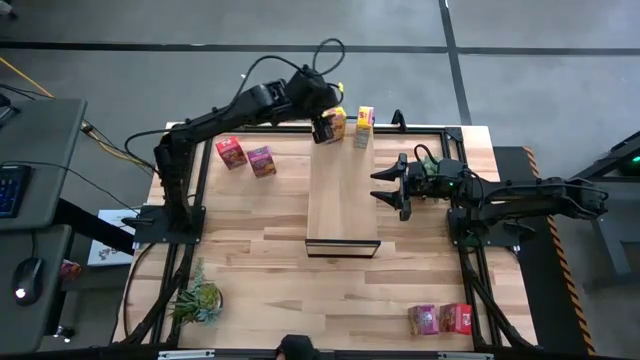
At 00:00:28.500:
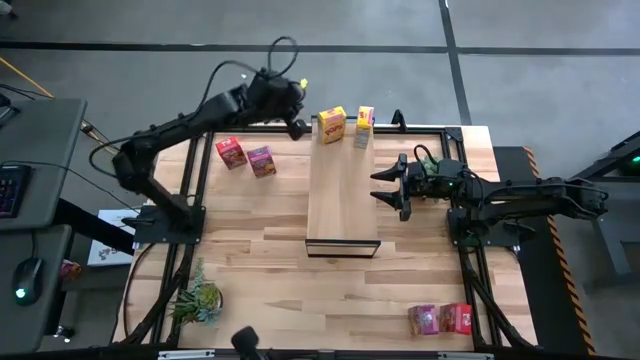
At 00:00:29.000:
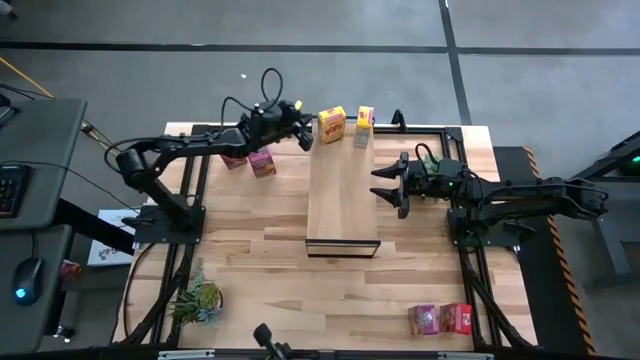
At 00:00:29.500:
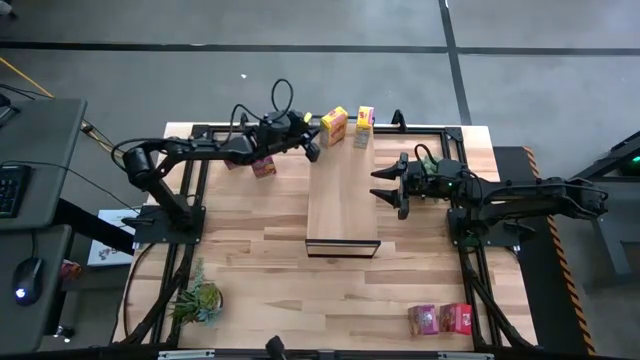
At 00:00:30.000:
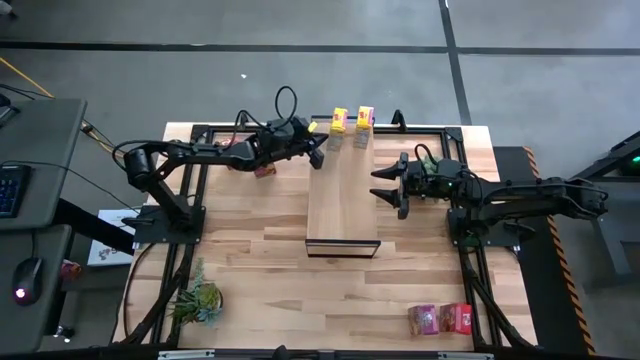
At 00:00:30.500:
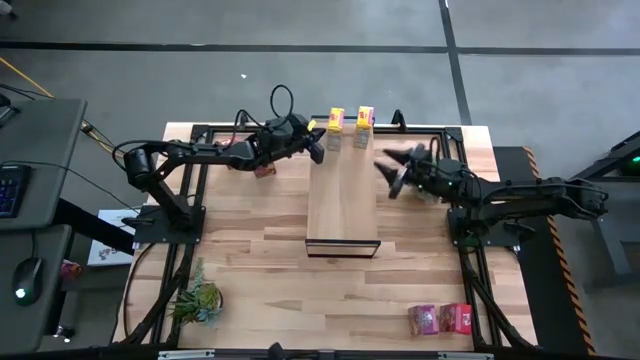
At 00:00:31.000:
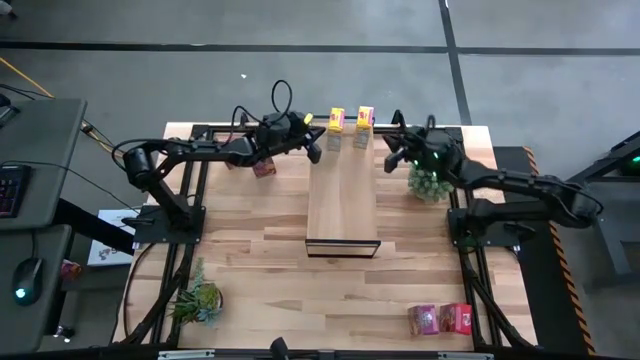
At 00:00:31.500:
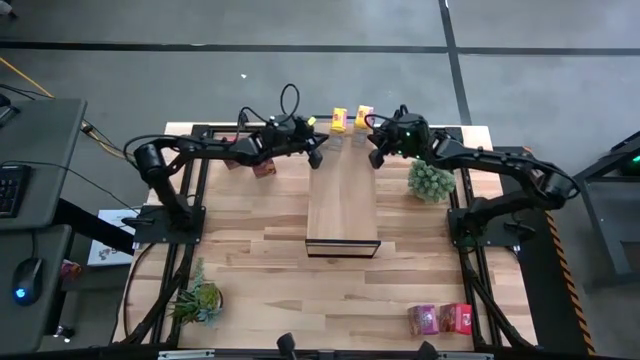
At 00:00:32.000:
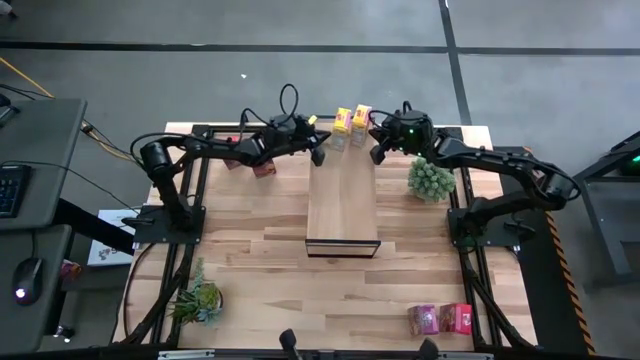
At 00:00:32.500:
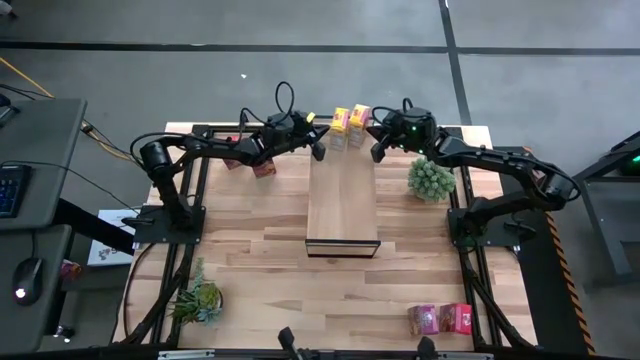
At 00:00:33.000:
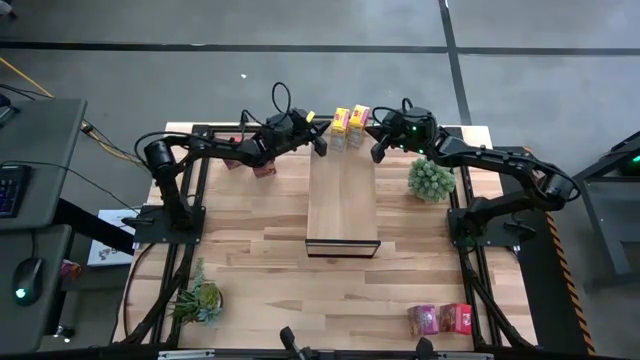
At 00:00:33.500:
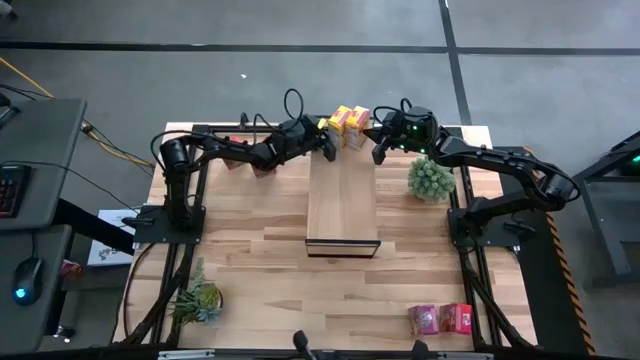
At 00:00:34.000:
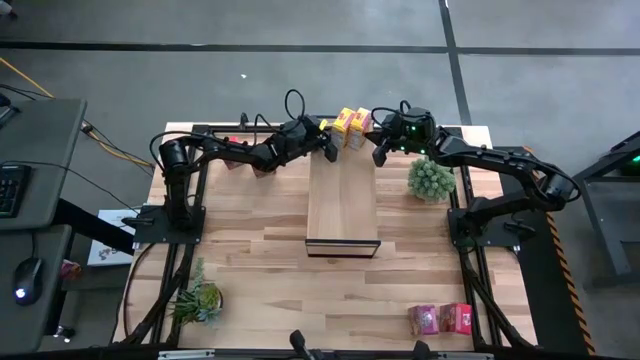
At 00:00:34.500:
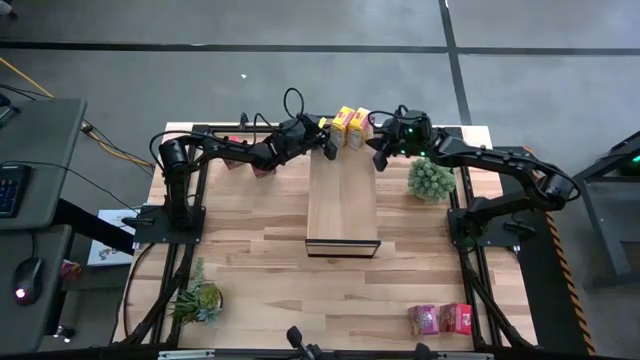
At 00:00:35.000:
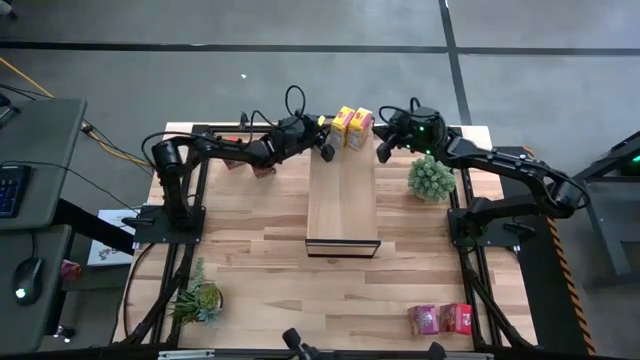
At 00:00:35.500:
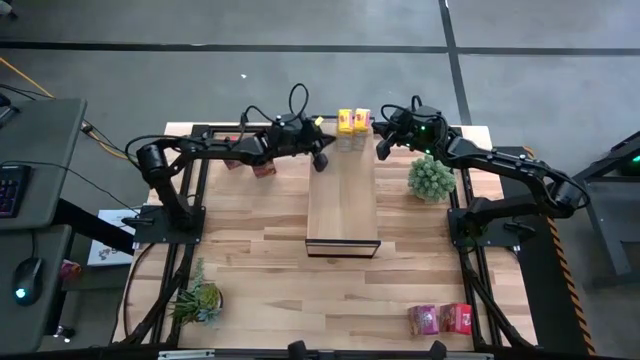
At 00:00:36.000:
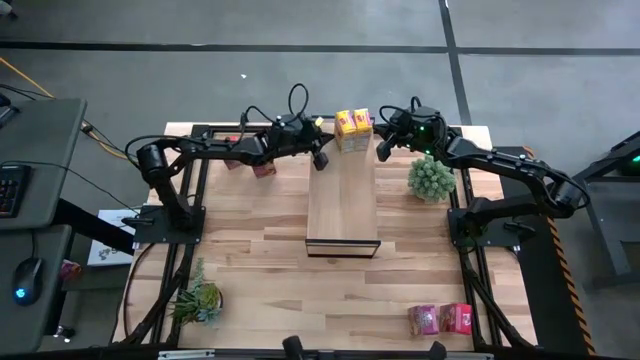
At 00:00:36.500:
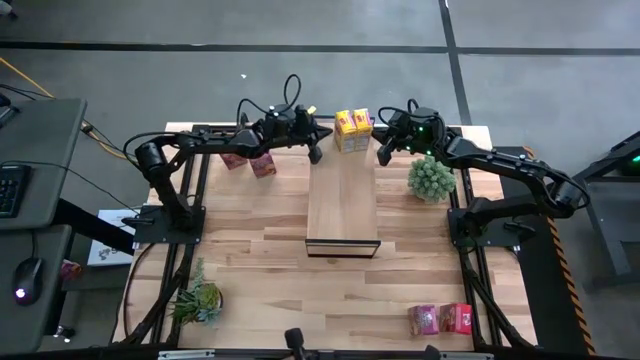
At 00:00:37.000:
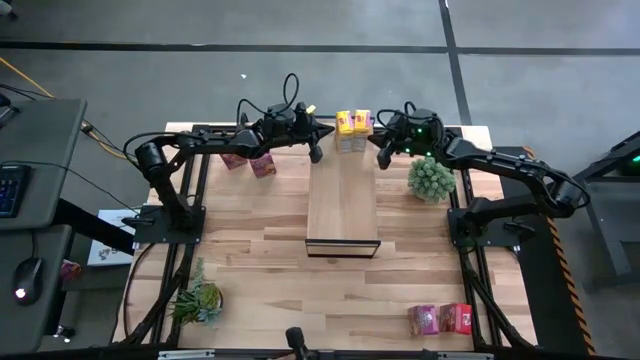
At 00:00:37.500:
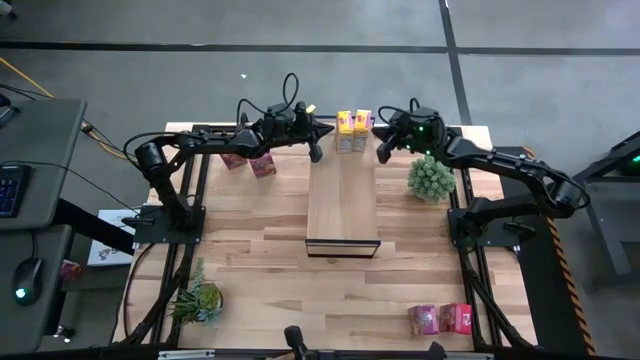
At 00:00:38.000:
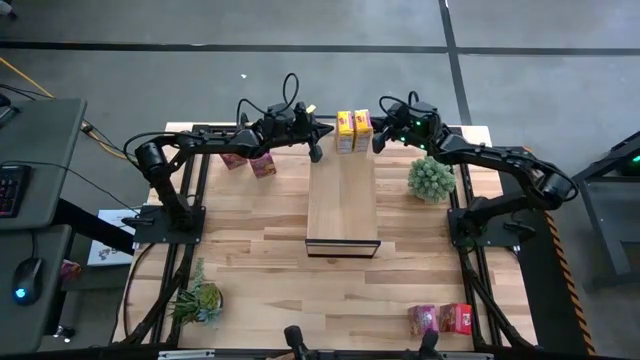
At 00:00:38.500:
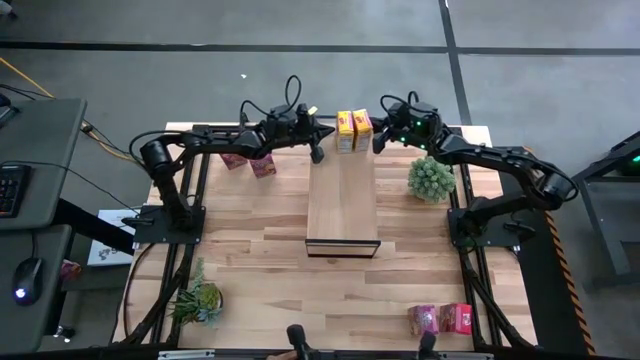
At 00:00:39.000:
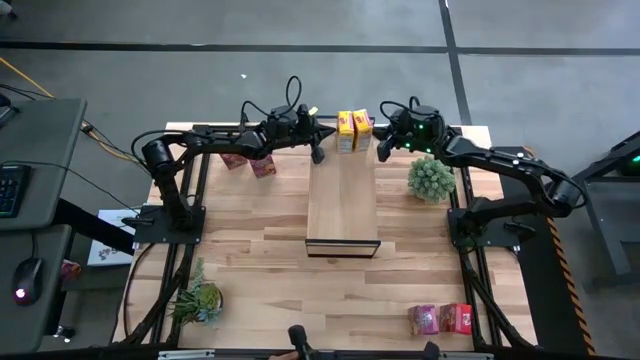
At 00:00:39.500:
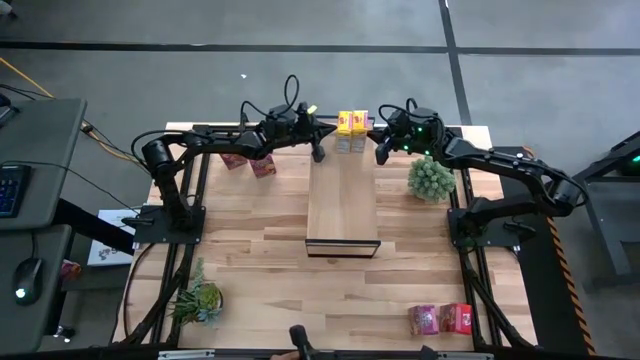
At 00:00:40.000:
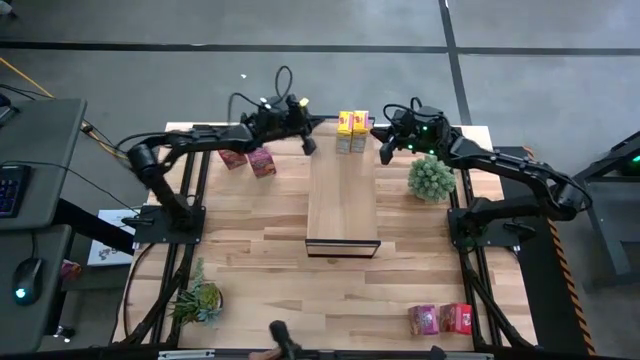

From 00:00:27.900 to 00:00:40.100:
Task: Stack cereal on shelf
Adjust the yellow cereals box on the shelf

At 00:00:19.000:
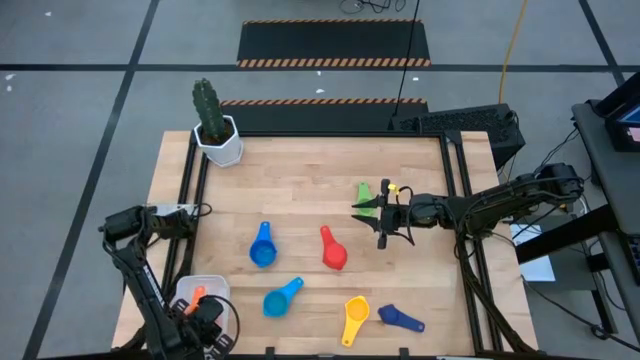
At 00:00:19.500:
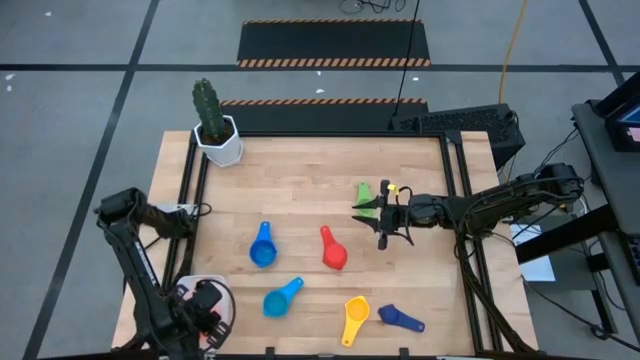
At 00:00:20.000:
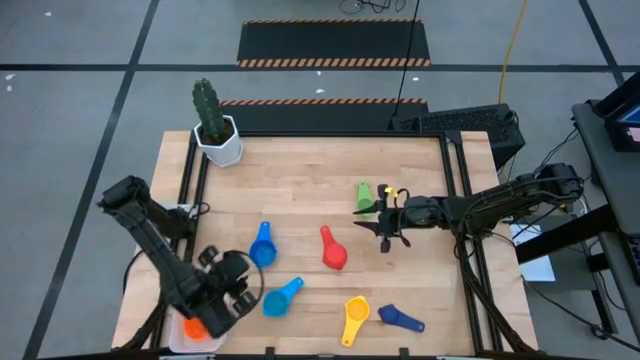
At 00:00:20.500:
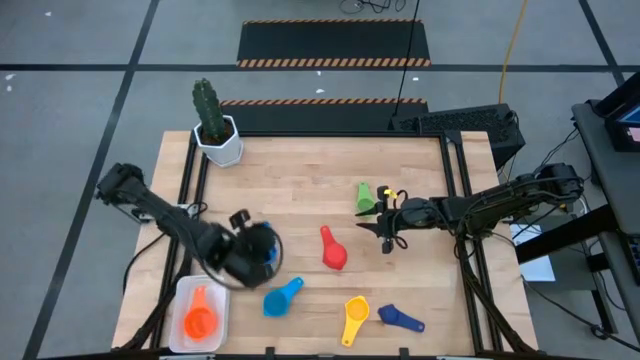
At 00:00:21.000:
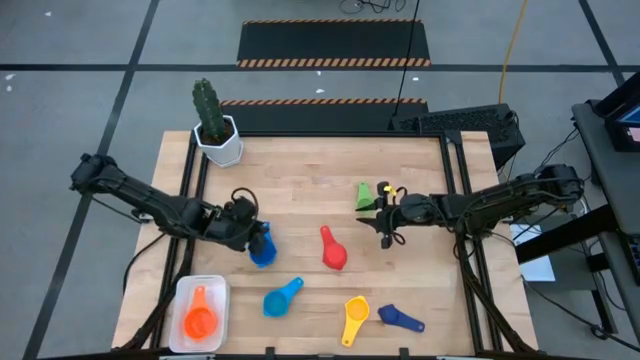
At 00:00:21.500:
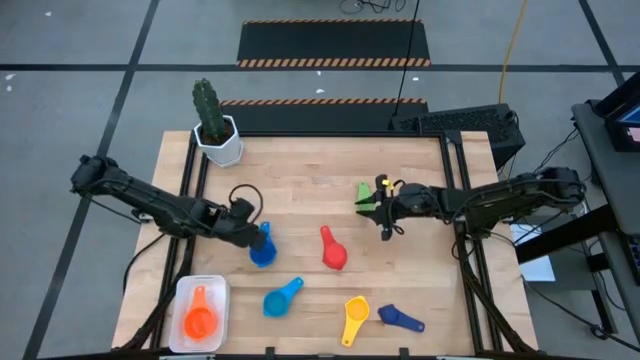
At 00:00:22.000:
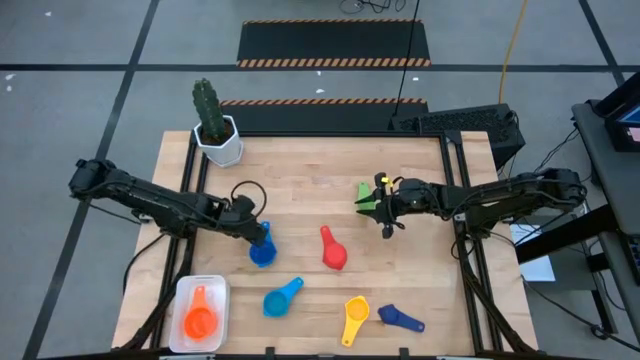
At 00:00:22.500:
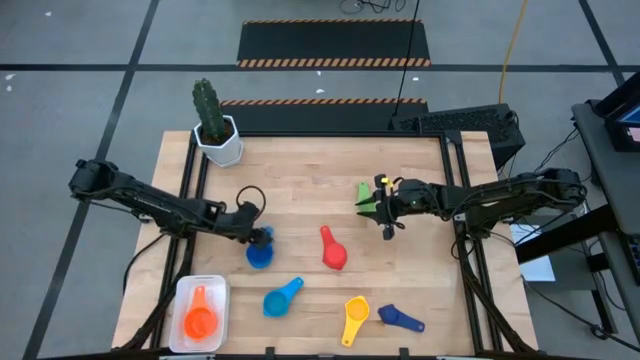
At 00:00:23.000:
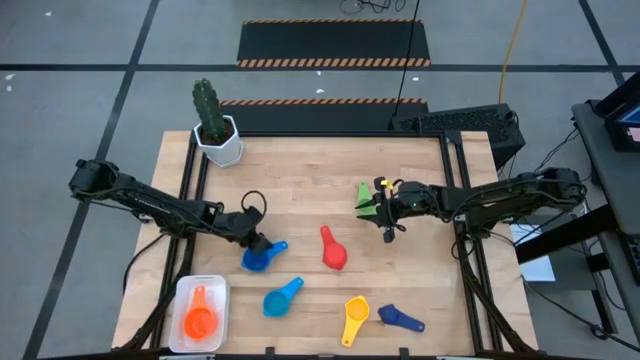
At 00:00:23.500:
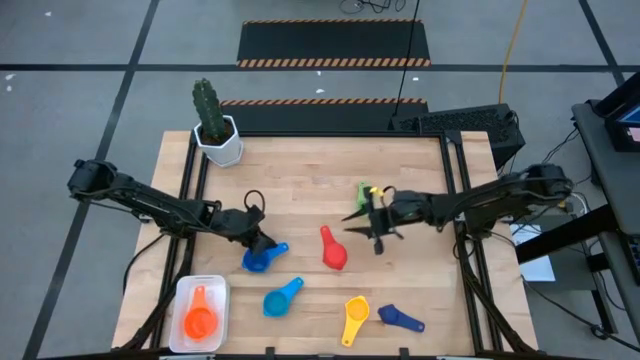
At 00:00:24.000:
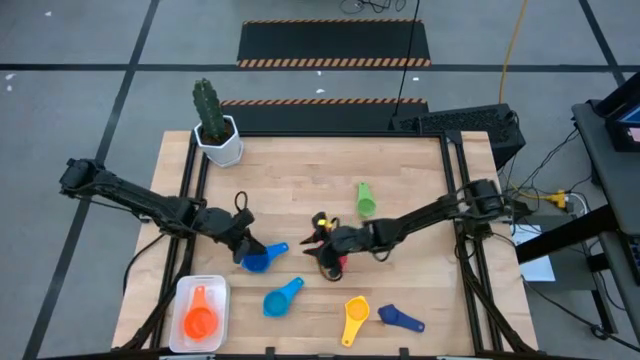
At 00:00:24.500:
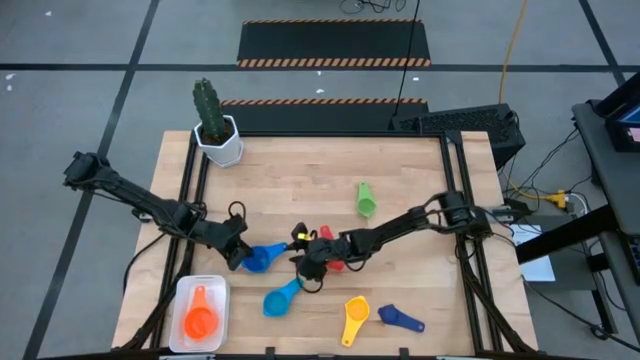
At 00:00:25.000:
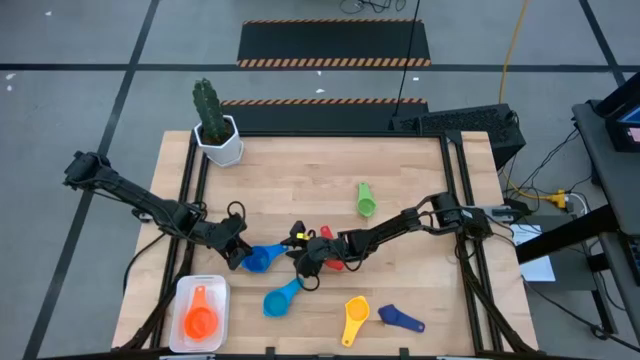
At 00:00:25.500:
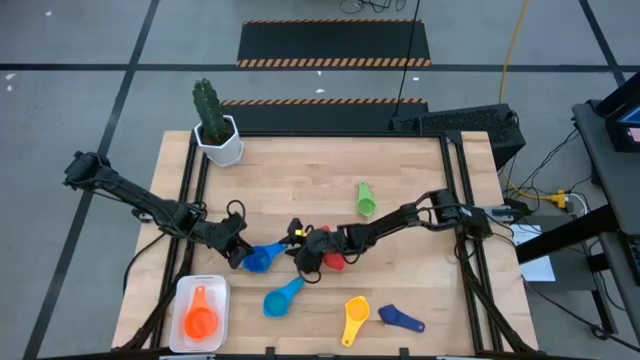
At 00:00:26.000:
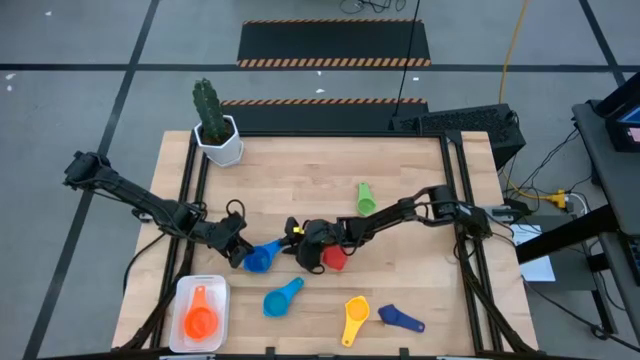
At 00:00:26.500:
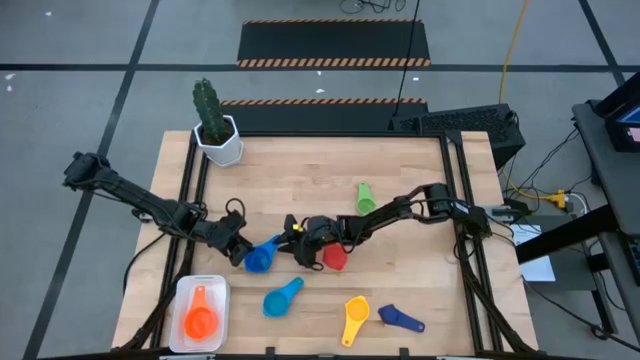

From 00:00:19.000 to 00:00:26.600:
Task: Nest measuring cups in basket
Stack the blue measuring cup on top of the orange measuring cup into the white bin
